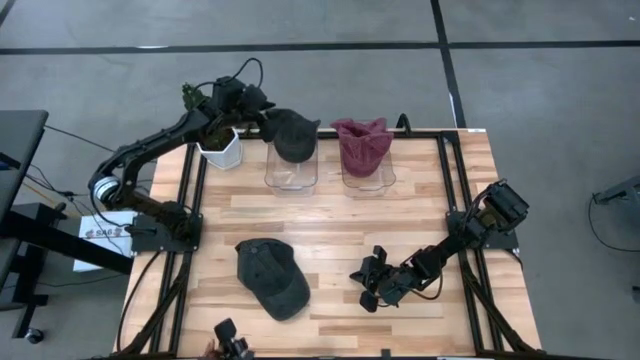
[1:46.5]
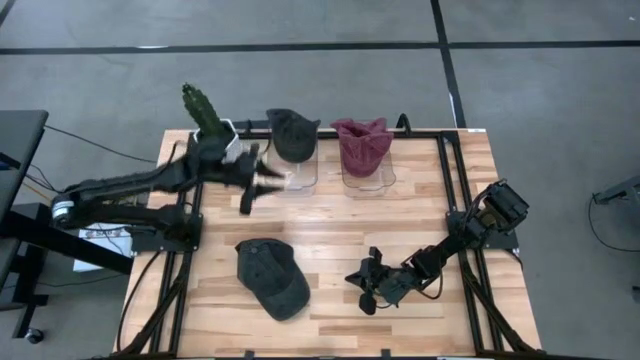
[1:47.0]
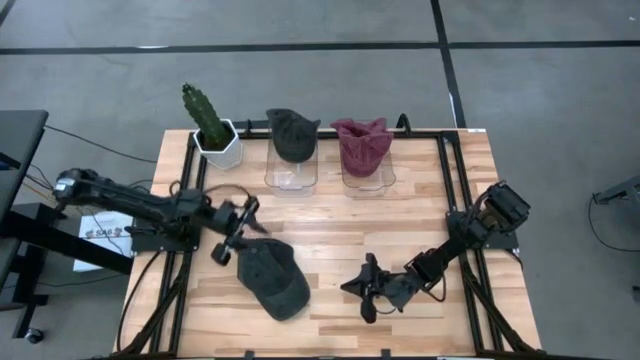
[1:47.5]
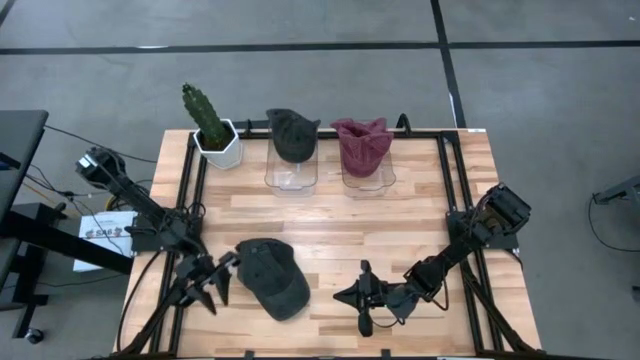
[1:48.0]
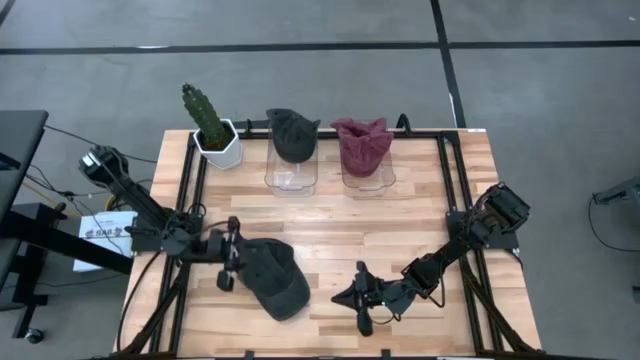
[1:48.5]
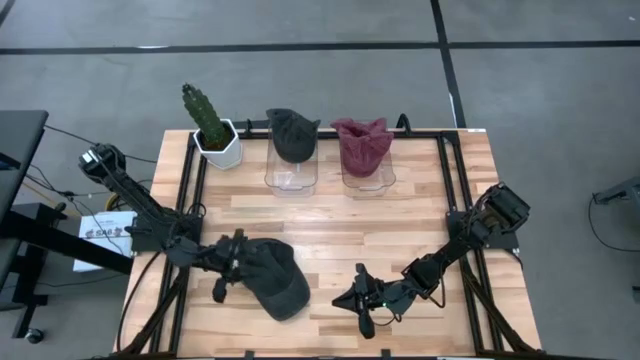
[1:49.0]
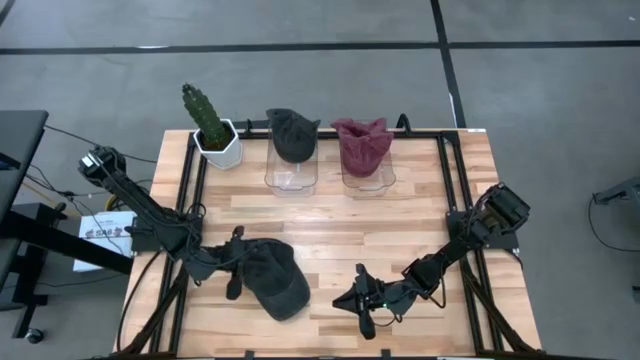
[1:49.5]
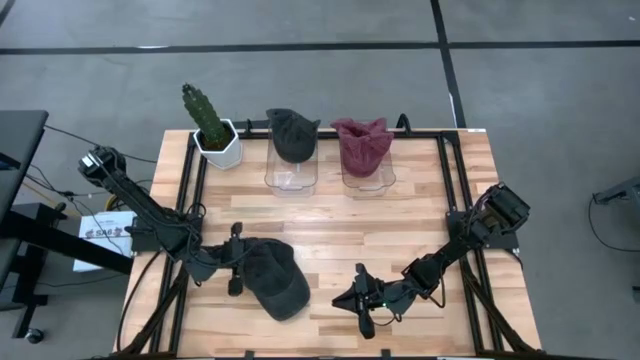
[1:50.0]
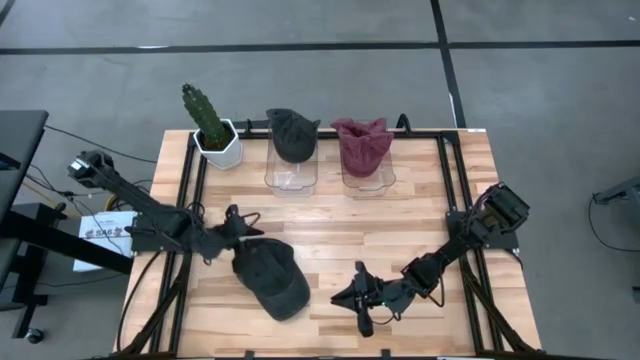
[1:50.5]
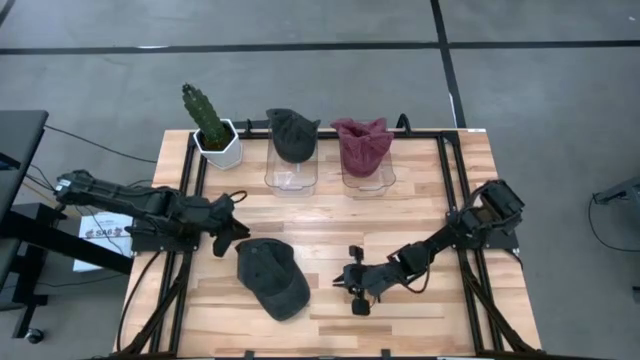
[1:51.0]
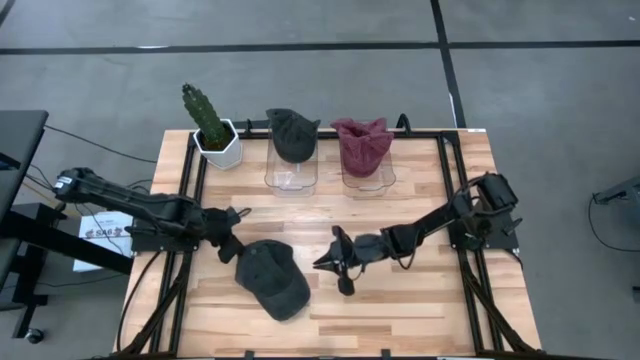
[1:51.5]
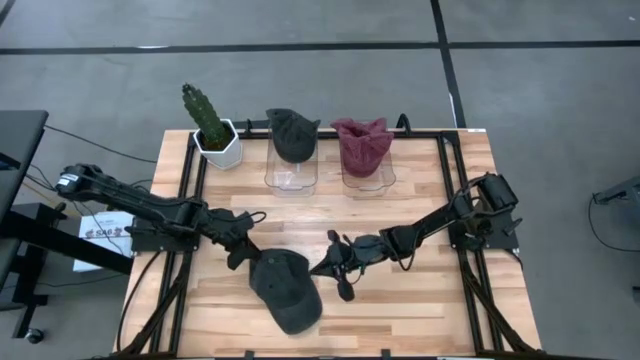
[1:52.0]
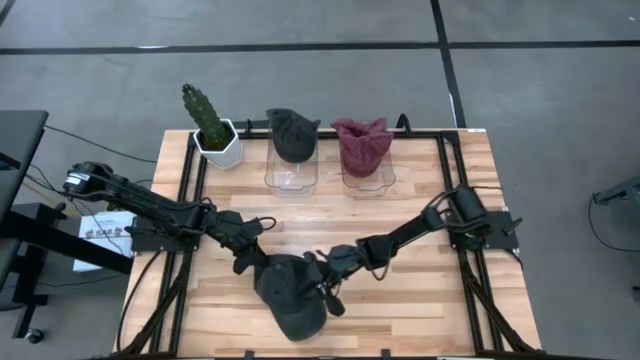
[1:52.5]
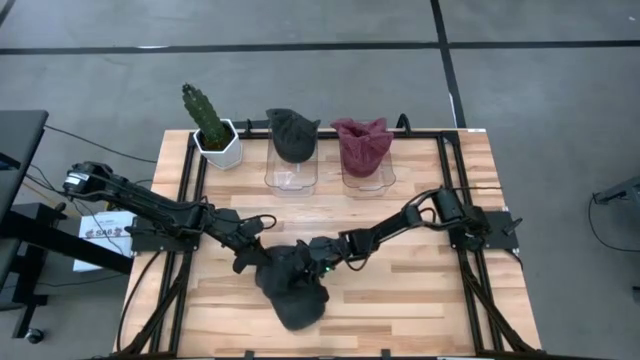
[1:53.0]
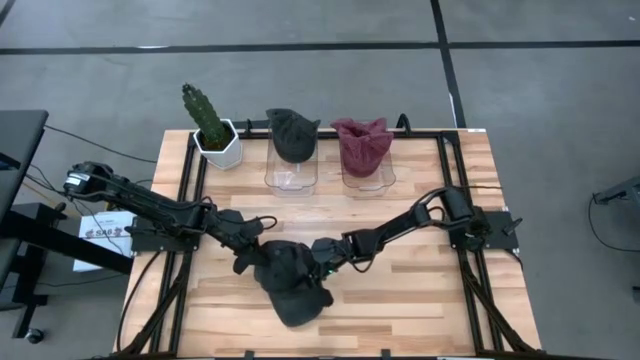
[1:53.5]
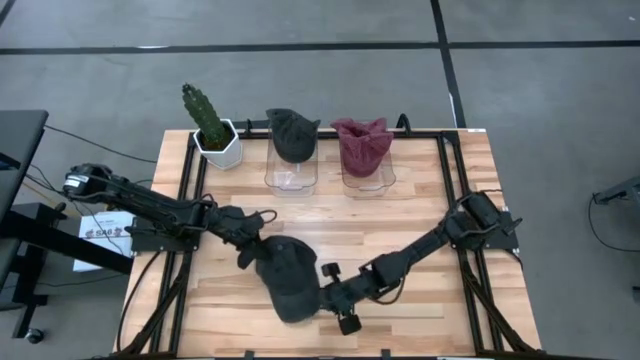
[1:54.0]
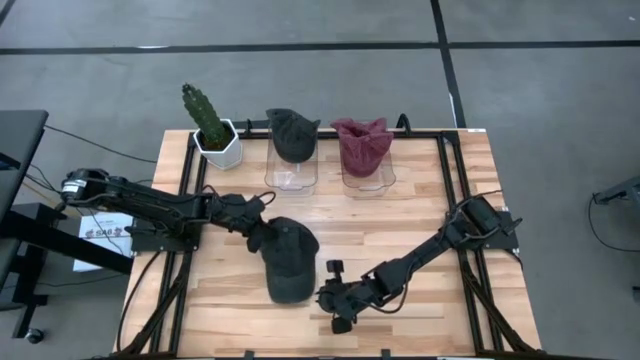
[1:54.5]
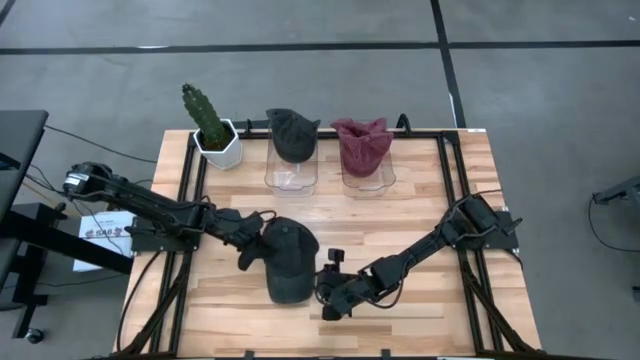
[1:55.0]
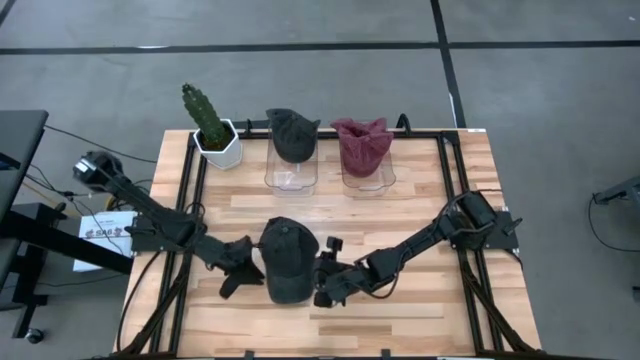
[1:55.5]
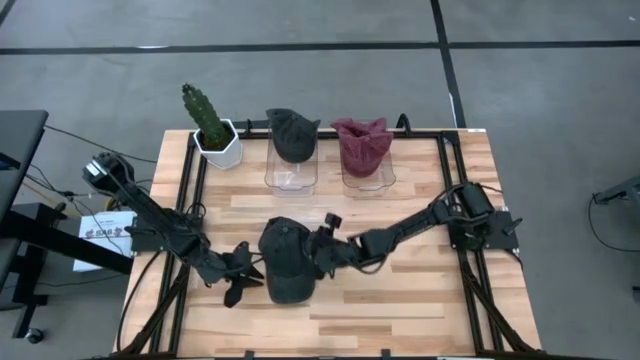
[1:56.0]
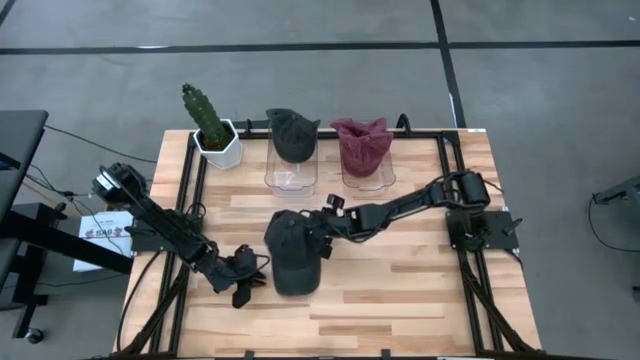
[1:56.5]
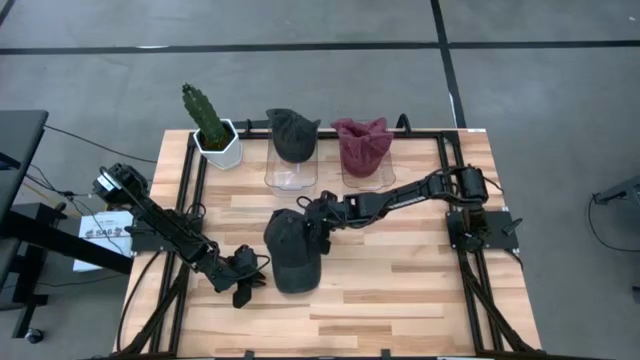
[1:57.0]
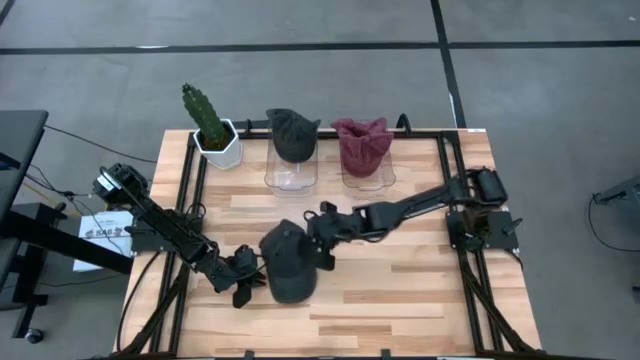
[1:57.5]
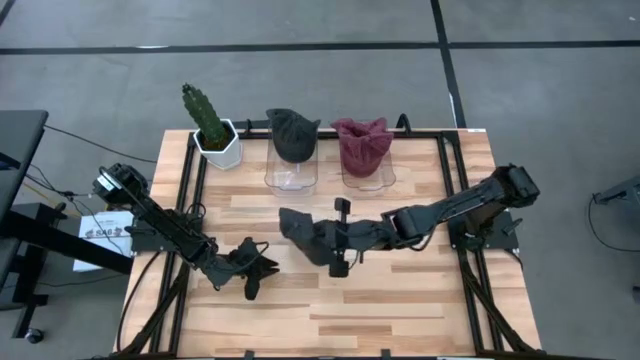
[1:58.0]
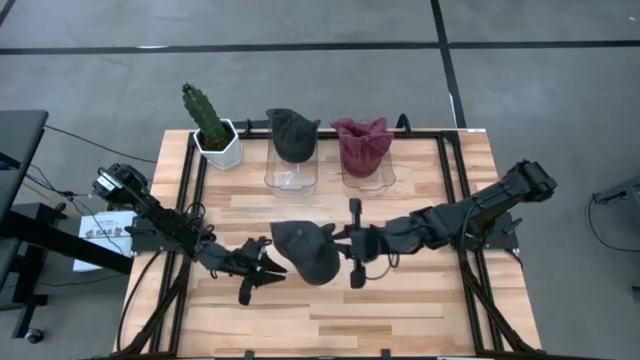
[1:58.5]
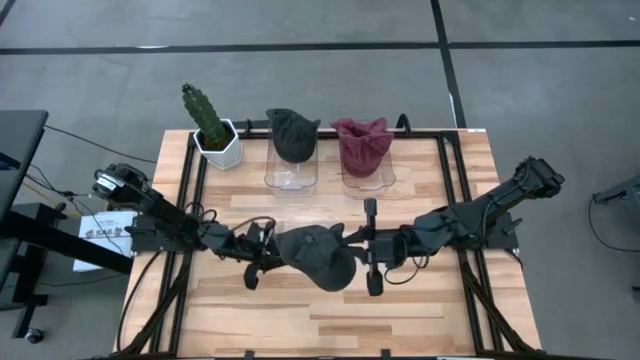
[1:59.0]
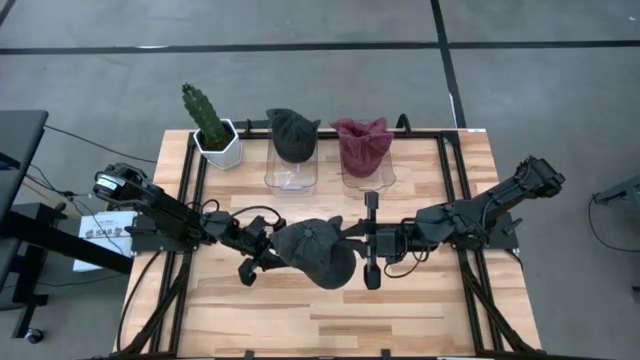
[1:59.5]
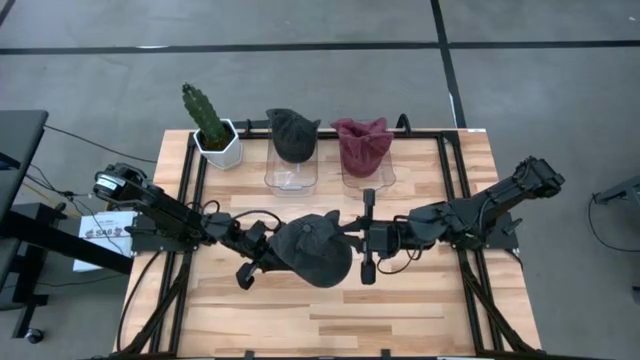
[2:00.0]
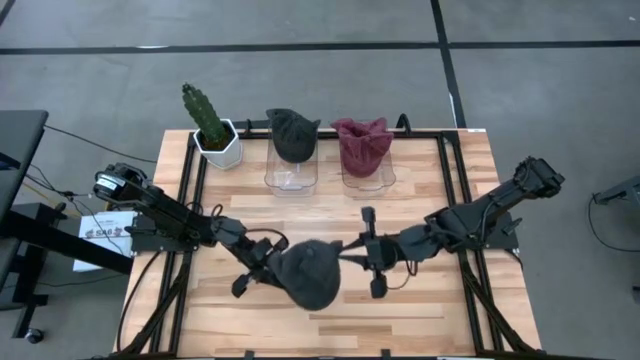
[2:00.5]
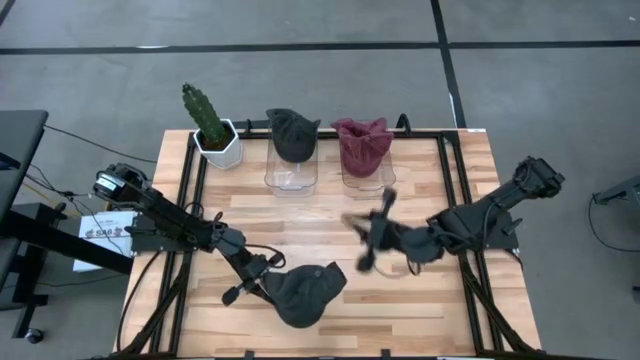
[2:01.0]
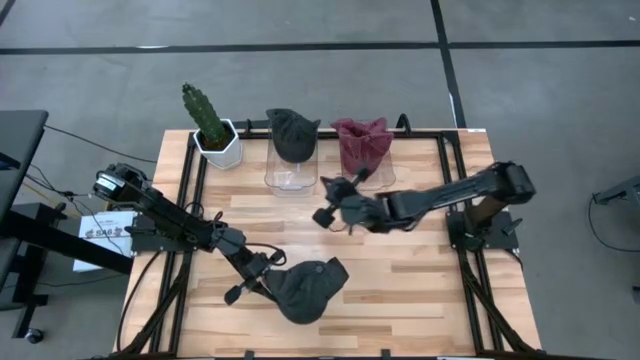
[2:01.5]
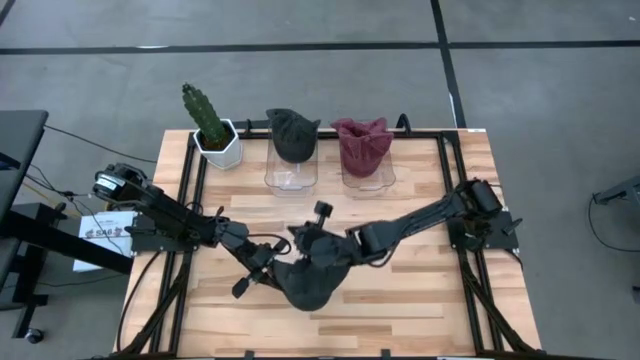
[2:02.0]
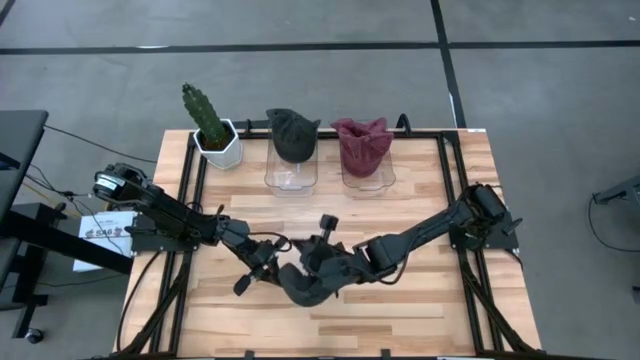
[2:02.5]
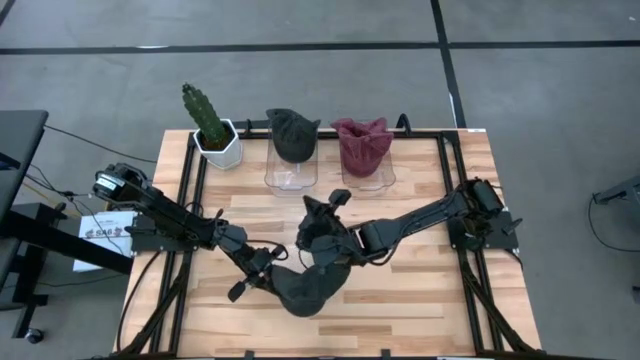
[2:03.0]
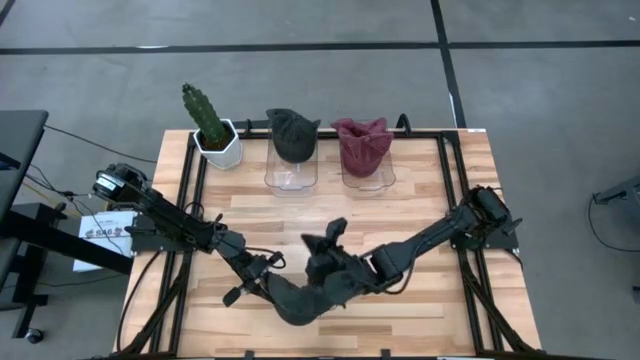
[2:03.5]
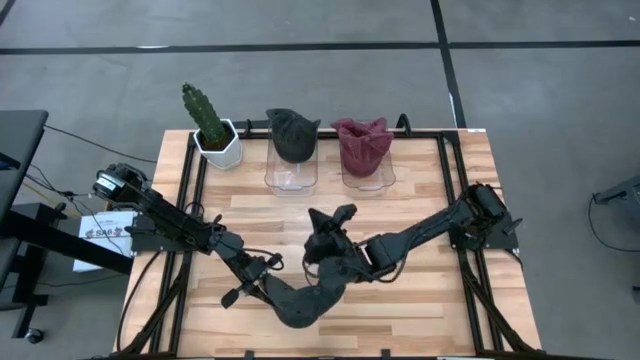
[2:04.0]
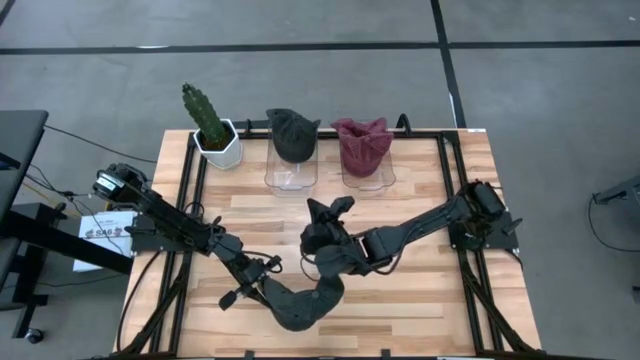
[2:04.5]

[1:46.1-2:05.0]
Task: Pick & Place hat
Put the black cap into the left transparent bin

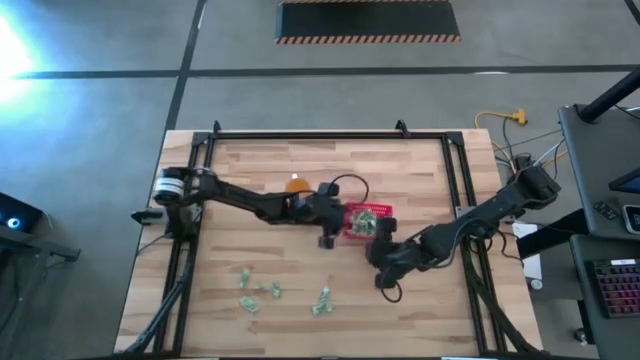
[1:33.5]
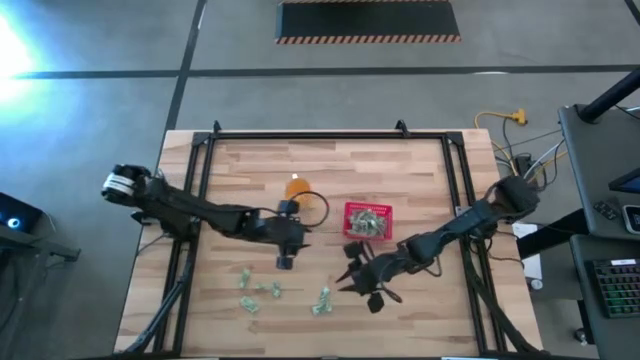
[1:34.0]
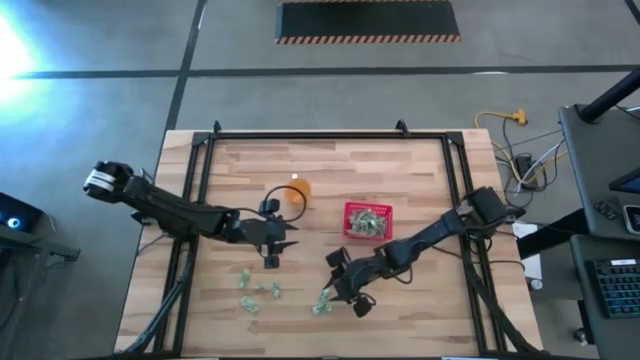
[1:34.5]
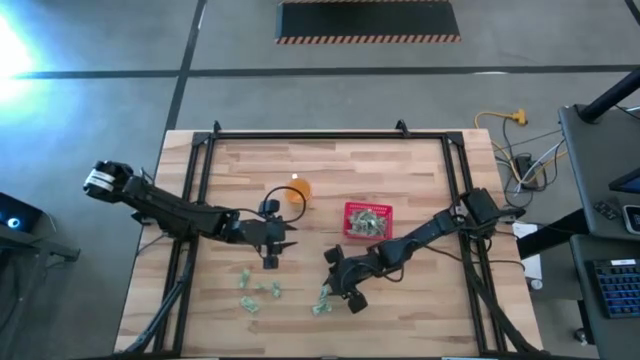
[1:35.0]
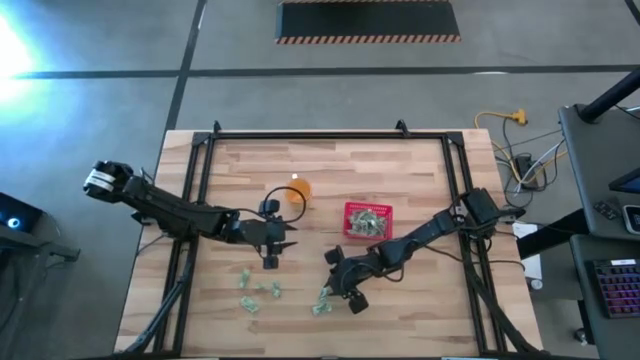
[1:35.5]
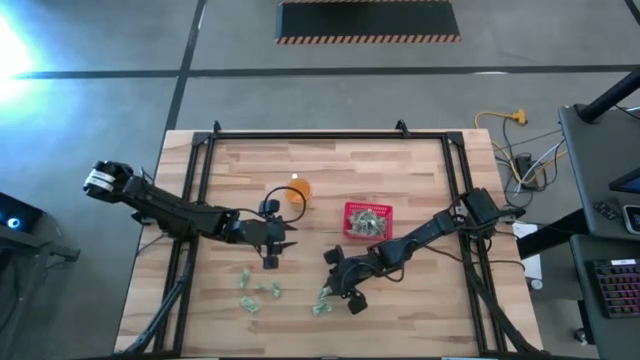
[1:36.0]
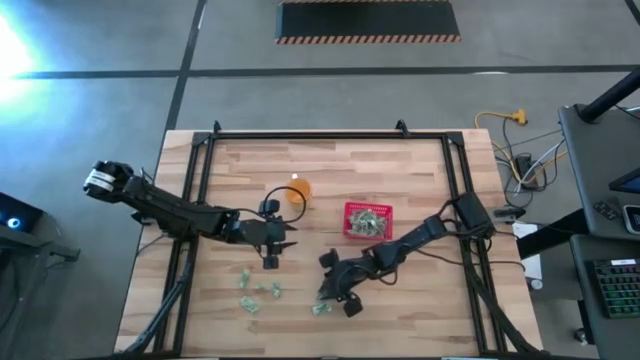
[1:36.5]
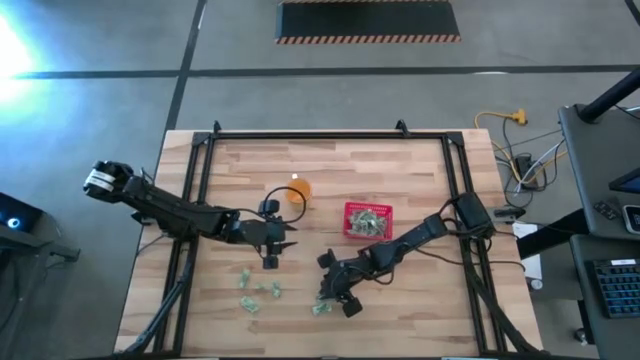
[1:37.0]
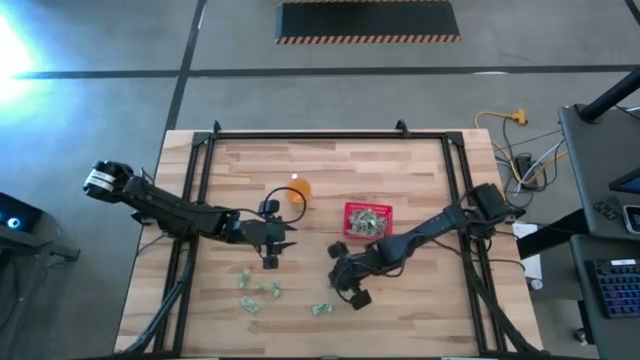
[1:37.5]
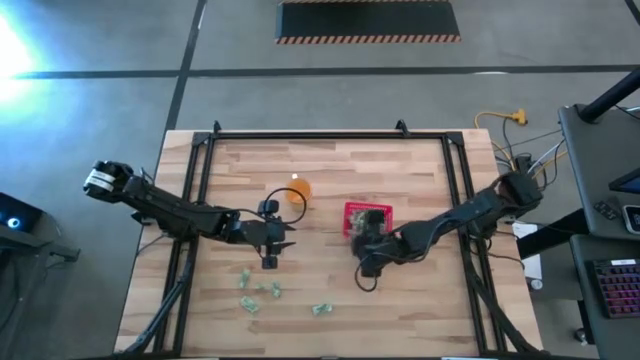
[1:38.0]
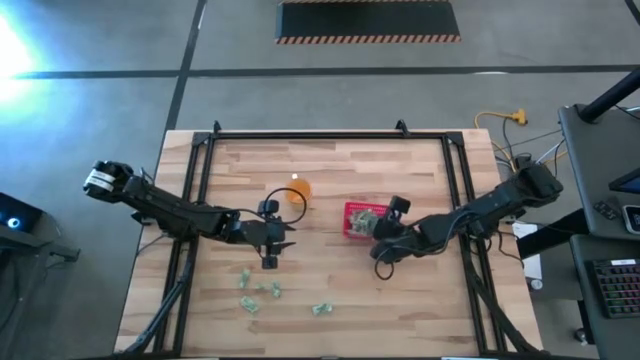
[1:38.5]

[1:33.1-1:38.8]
Task: Pick and place Stevia / Truvia into bins
Put the stevia packet into the basket
